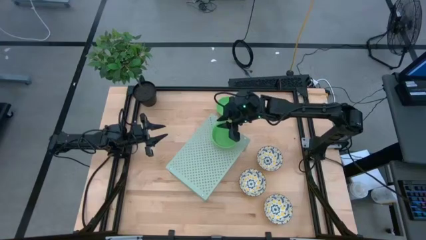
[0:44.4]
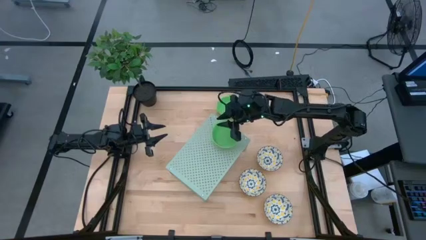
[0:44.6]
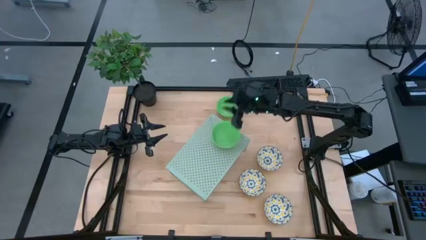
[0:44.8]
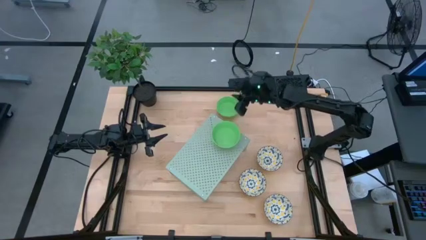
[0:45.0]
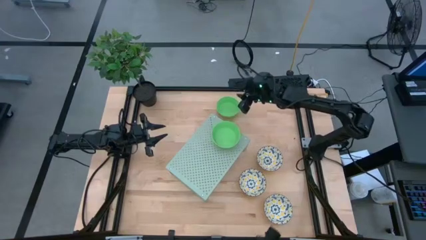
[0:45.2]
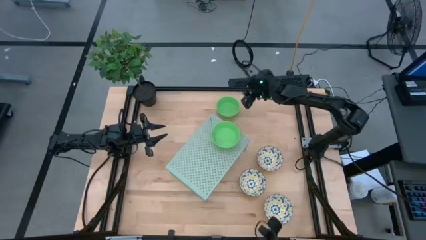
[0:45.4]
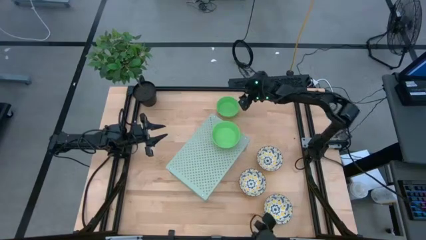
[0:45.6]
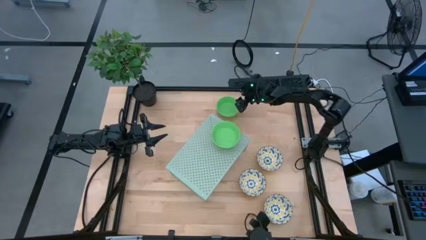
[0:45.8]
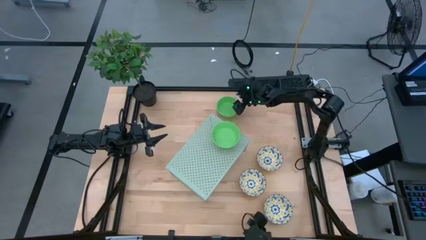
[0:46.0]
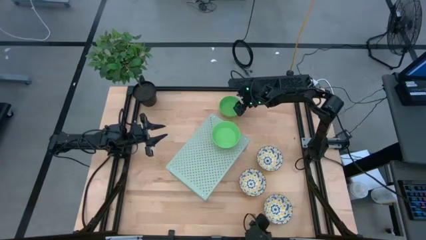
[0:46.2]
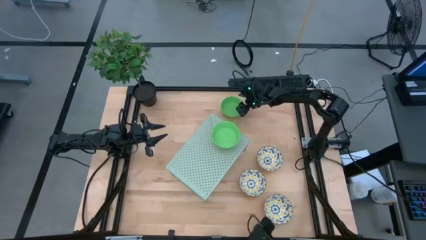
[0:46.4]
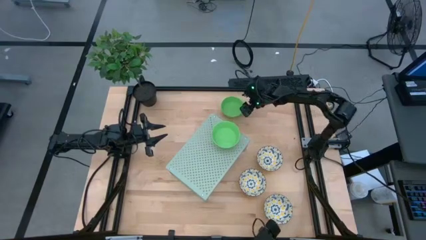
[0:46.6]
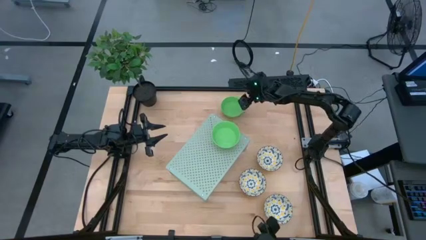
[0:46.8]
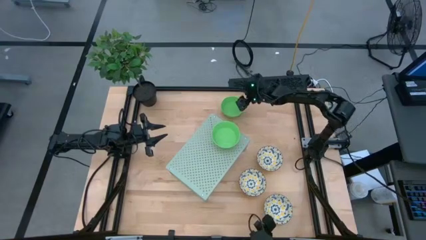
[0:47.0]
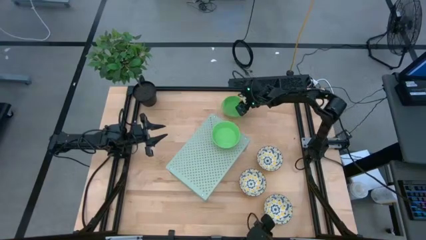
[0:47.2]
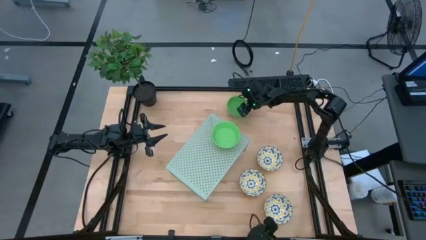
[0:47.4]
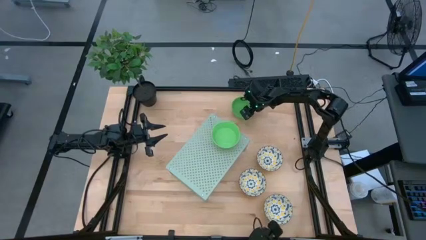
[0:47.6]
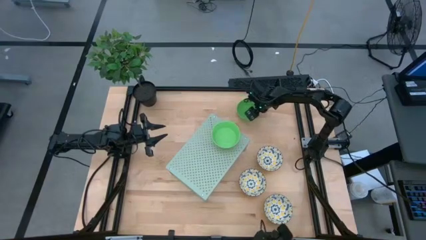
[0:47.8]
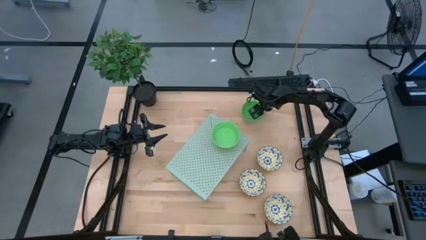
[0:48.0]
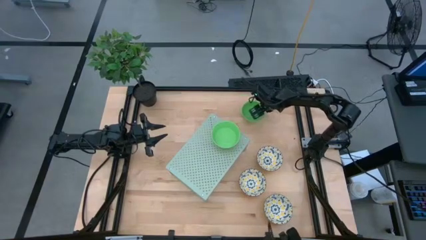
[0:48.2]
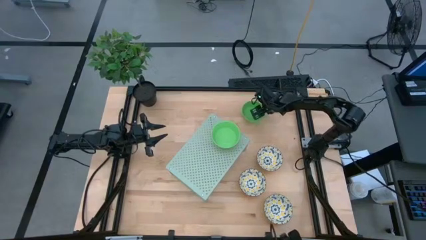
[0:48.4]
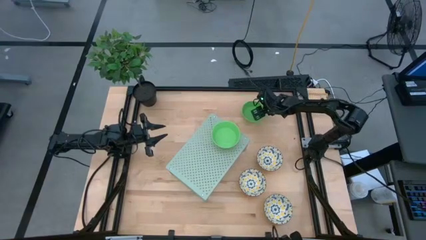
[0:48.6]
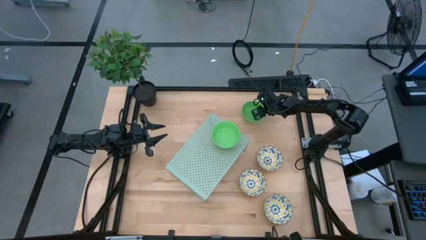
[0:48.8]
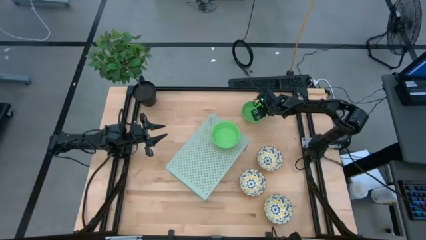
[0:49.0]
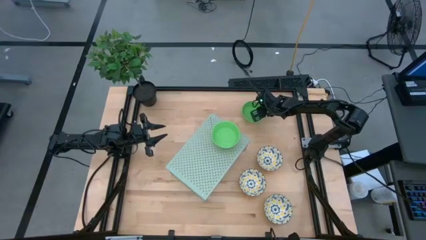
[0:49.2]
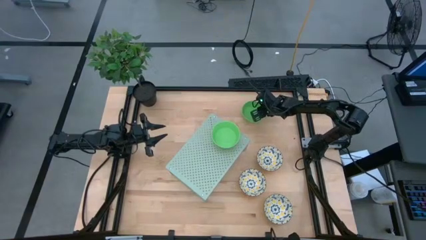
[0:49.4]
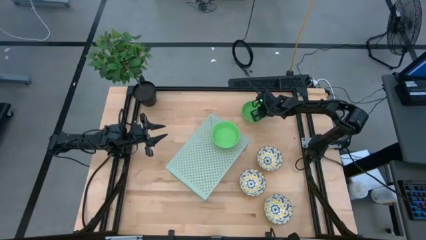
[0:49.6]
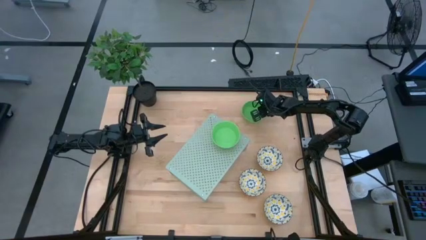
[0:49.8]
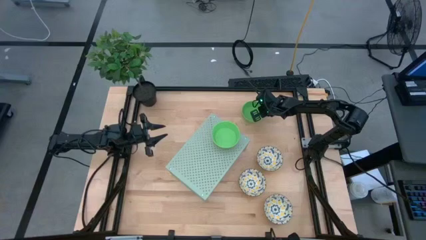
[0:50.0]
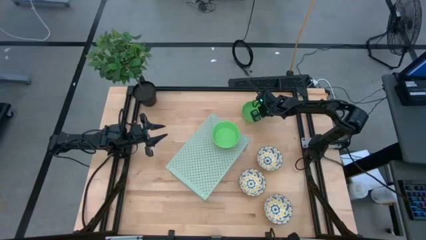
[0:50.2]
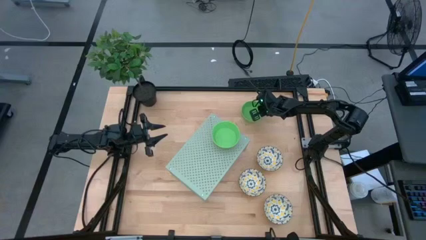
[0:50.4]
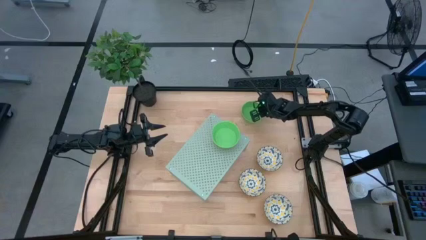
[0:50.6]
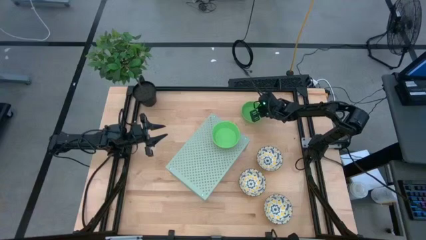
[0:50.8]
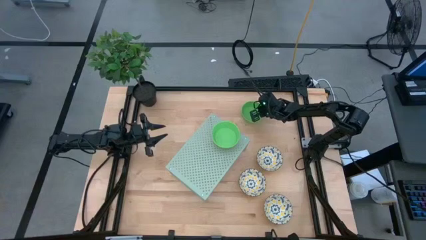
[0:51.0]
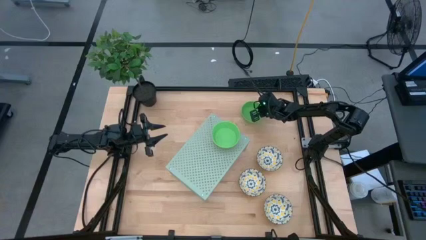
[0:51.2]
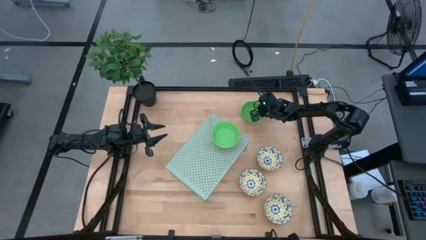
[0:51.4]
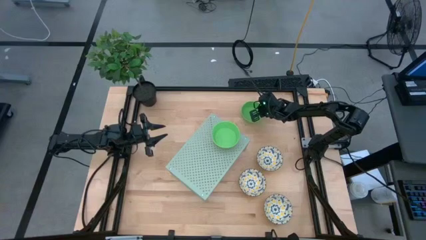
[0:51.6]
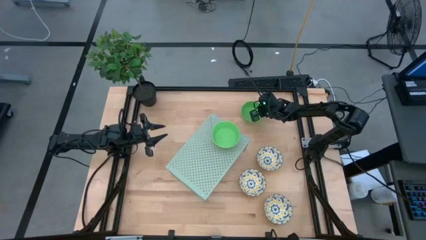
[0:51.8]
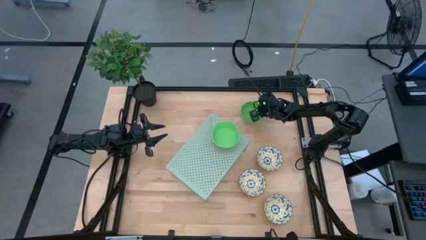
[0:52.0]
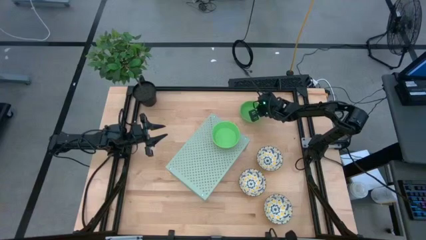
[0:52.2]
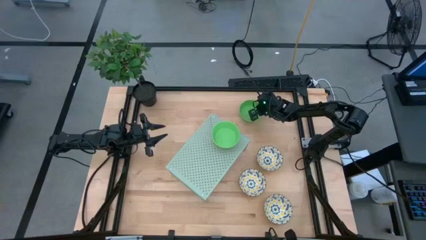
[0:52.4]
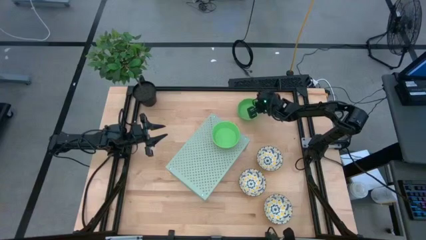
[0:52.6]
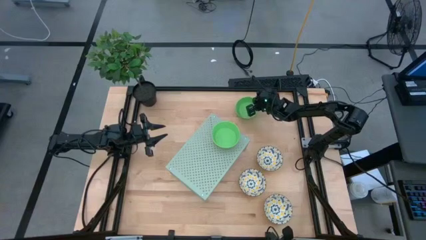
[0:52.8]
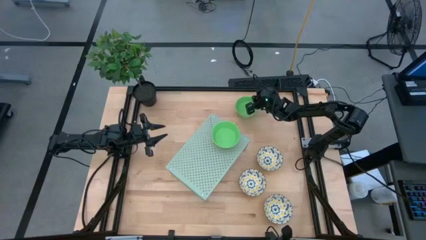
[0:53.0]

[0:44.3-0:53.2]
Task: Pick & Place Mini bowls
Stack the green bowl on the green bowl on the shelf

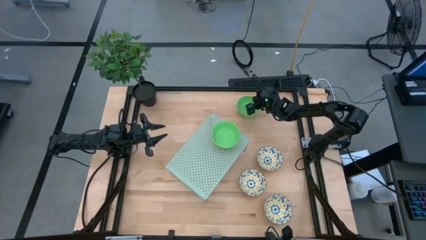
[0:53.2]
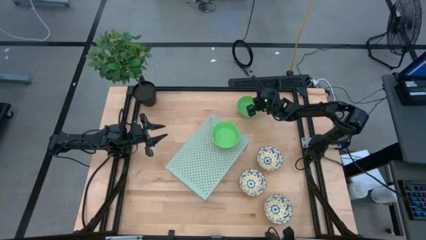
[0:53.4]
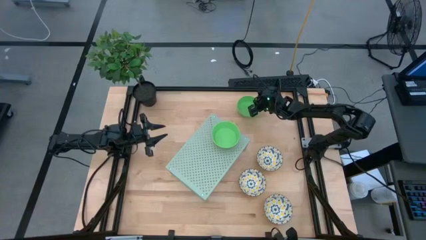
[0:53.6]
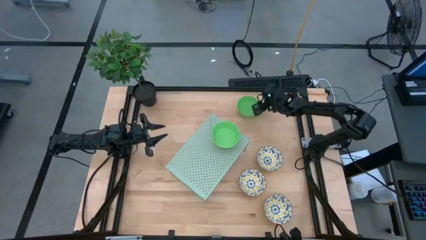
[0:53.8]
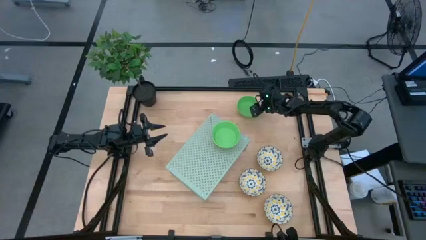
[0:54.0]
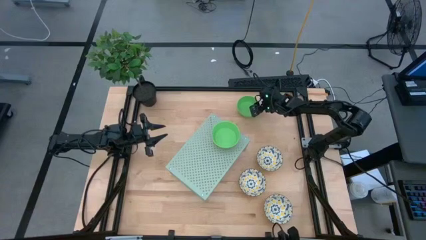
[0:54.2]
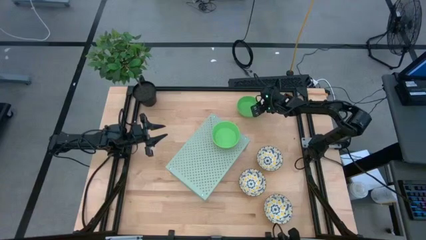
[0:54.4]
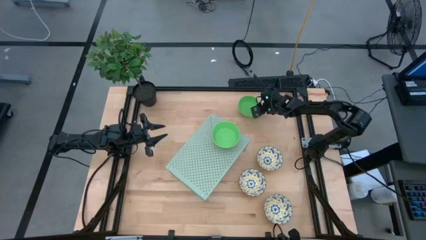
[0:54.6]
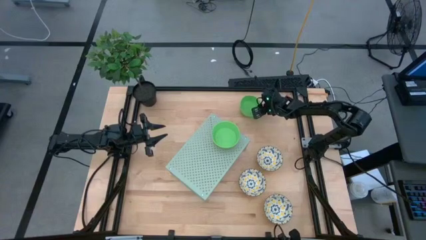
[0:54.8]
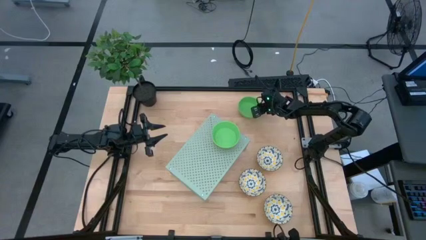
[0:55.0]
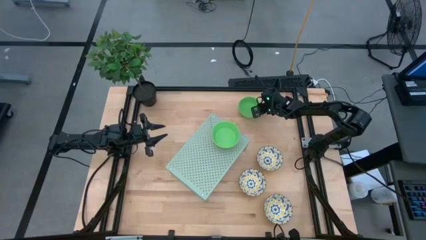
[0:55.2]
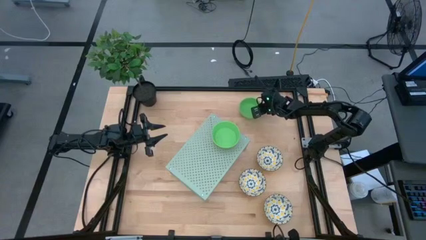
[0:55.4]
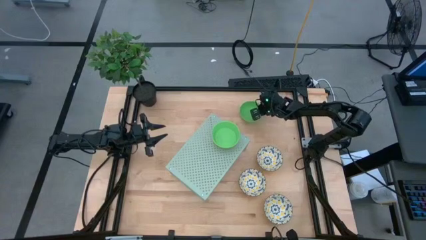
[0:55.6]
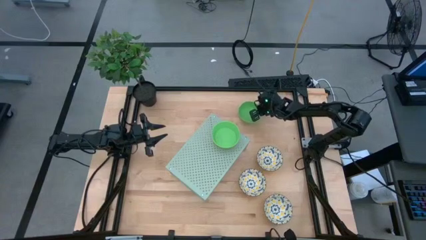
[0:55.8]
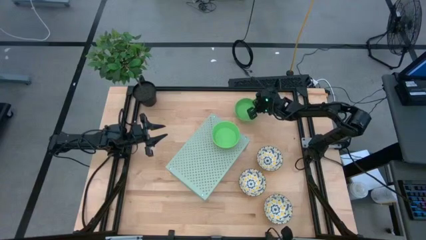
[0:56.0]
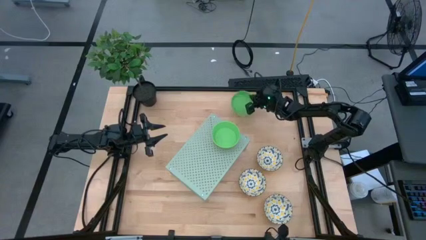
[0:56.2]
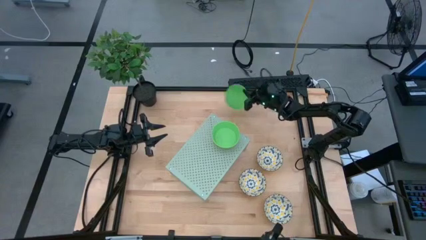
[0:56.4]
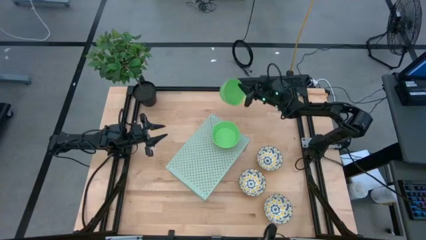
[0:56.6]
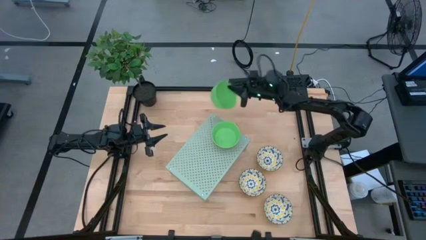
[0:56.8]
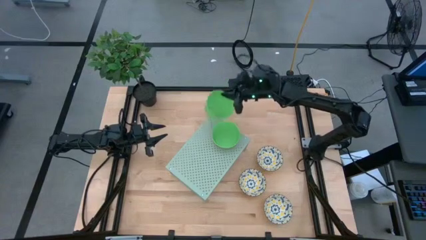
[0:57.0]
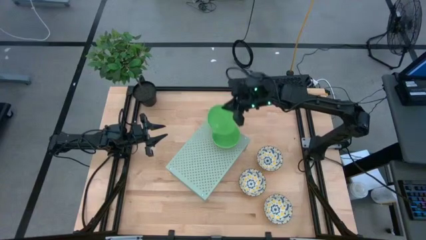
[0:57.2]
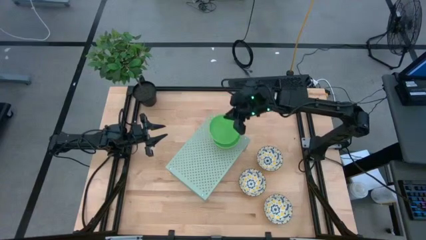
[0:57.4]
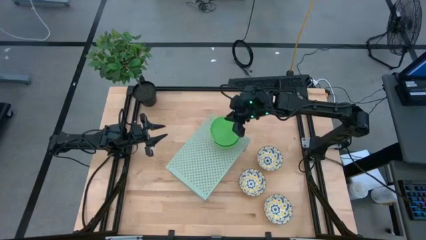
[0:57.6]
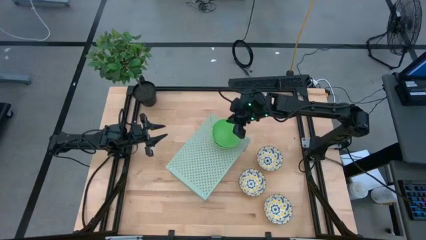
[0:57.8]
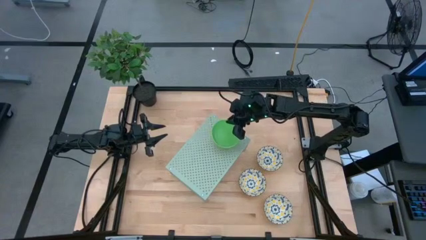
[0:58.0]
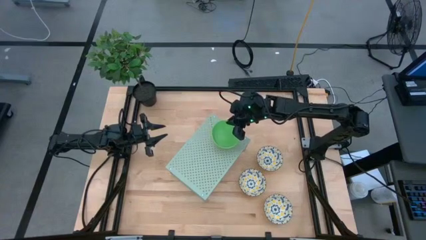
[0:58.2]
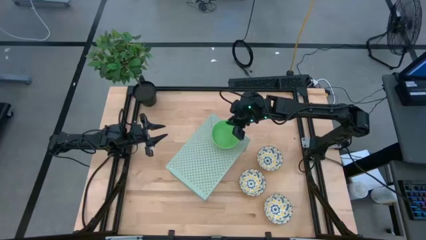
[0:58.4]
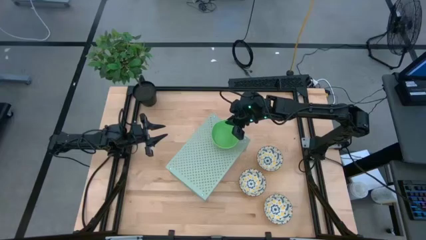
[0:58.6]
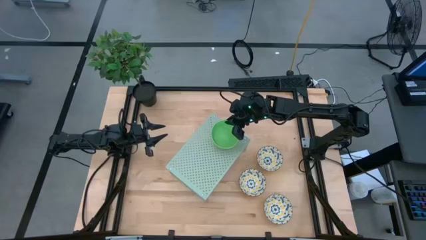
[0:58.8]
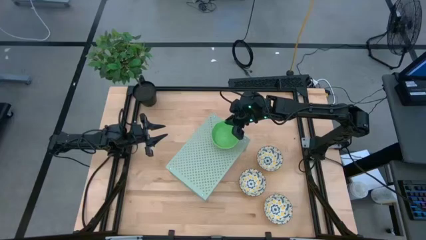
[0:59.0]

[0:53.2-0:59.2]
Stack the green bowl on the green bowl on the shelf

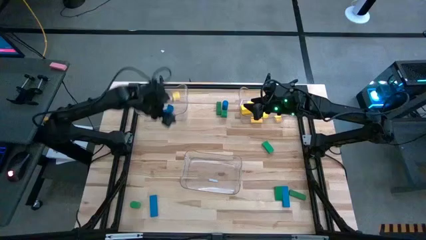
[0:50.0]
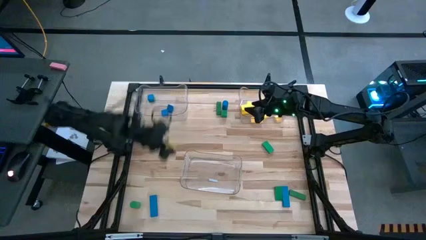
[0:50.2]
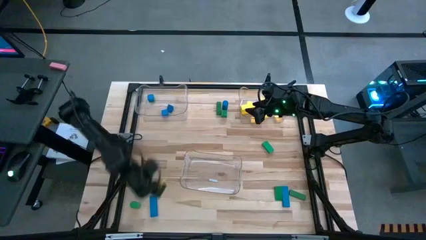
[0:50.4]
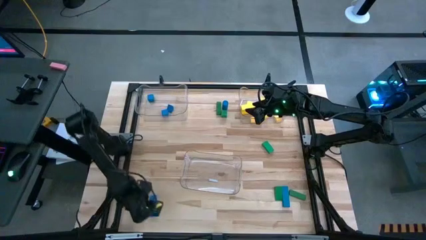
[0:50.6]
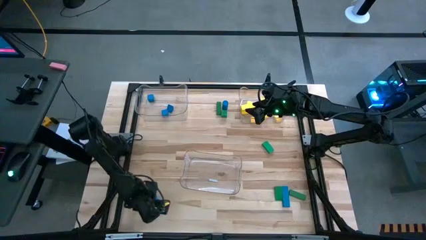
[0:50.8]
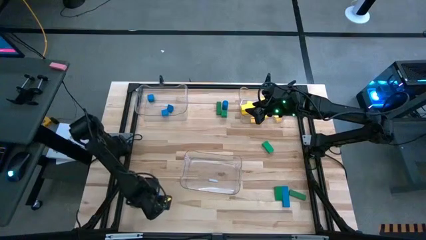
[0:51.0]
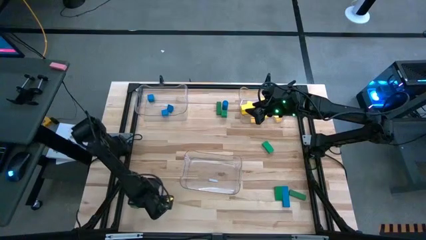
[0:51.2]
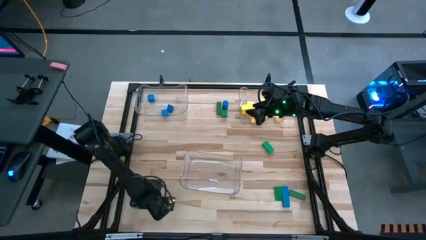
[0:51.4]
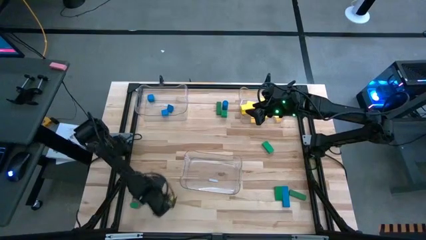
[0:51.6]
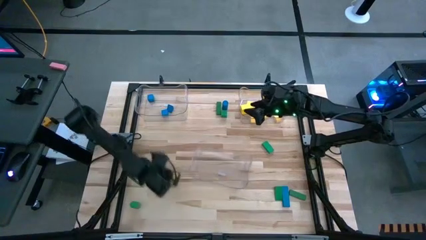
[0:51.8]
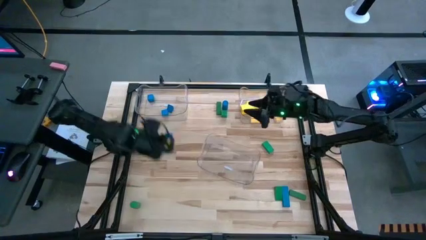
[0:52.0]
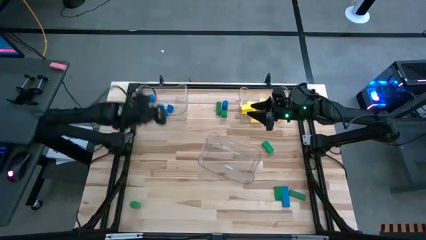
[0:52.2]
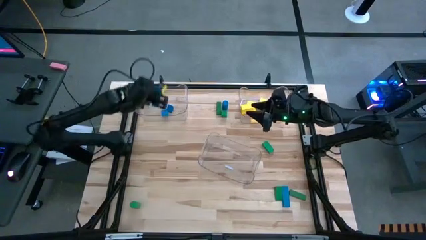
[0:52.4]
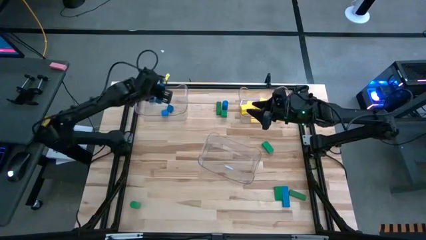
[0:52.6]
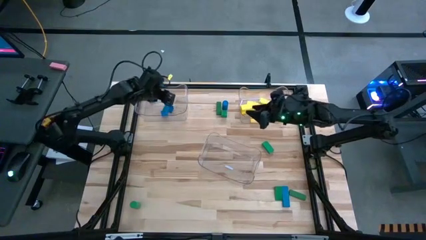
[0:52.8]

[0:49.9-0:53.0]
Task: Sort blocks
Put the blue block into the left transparent bin
